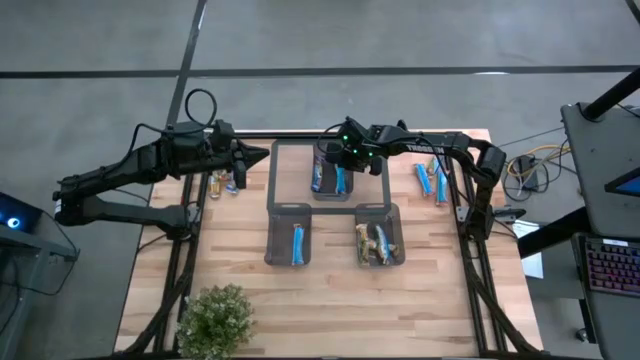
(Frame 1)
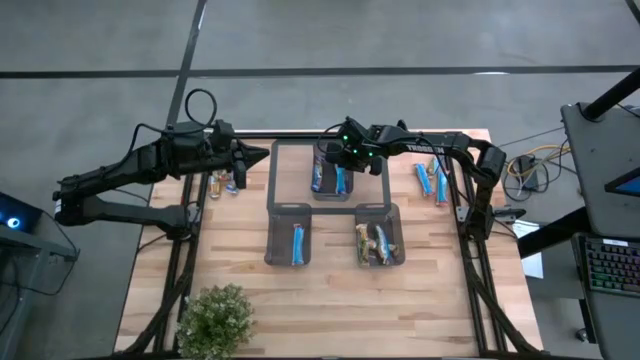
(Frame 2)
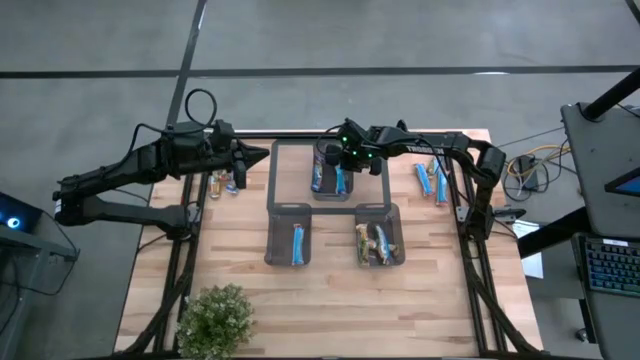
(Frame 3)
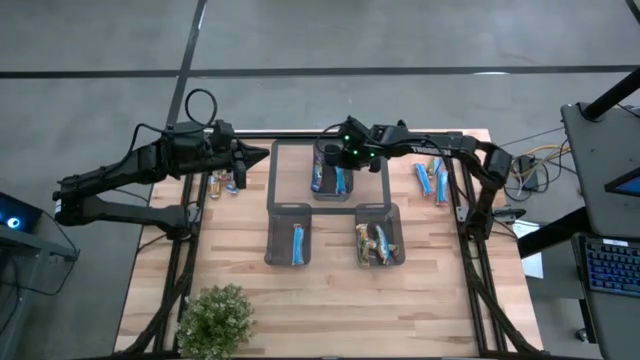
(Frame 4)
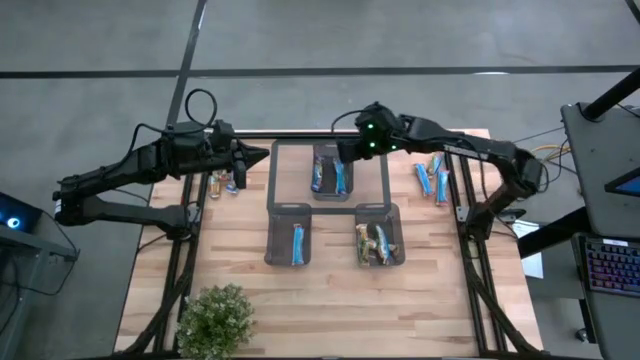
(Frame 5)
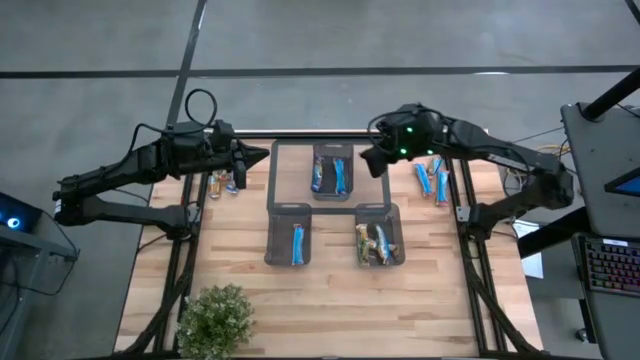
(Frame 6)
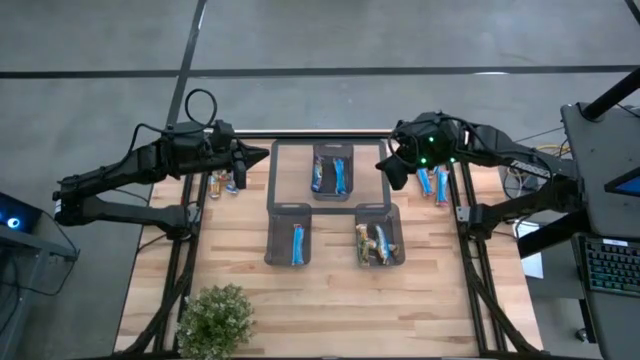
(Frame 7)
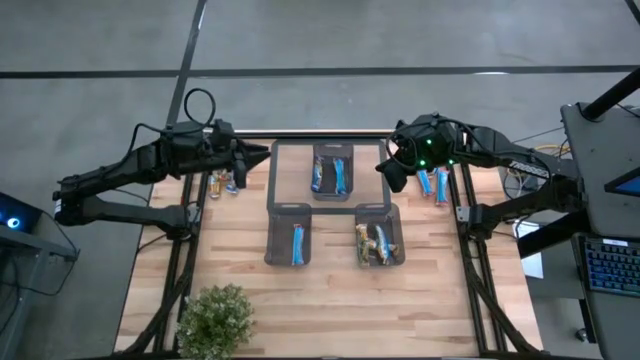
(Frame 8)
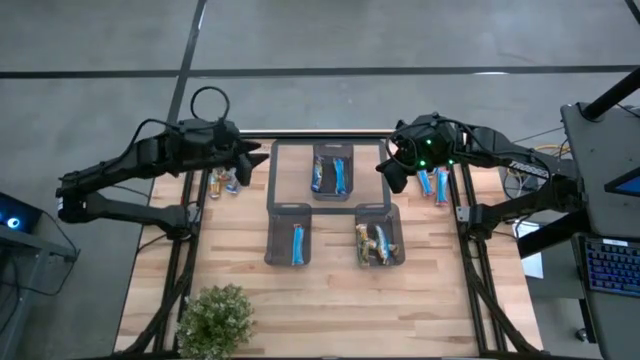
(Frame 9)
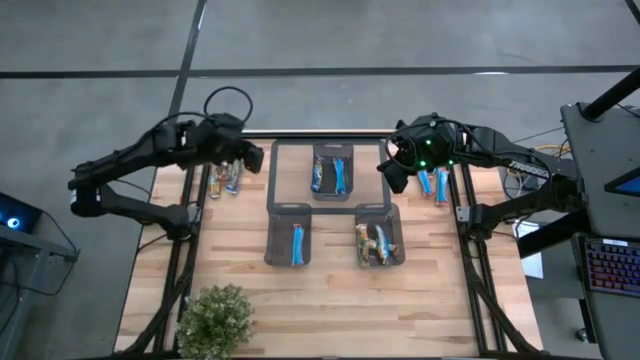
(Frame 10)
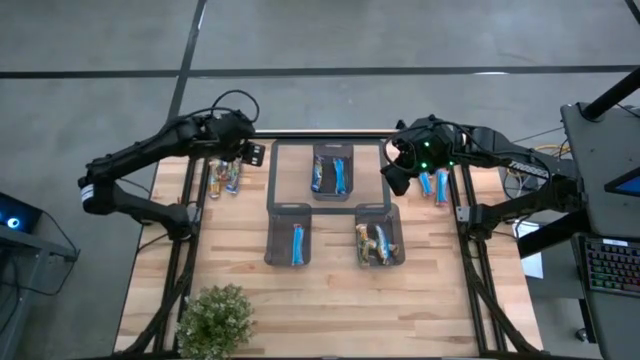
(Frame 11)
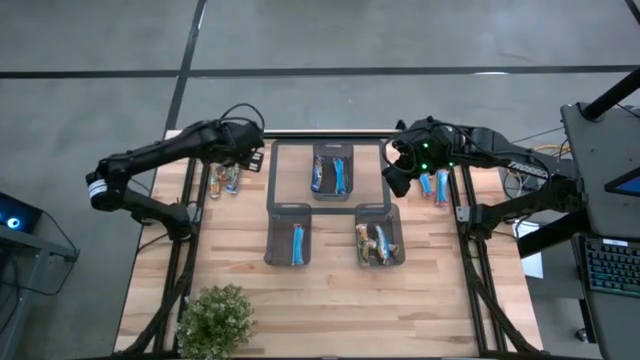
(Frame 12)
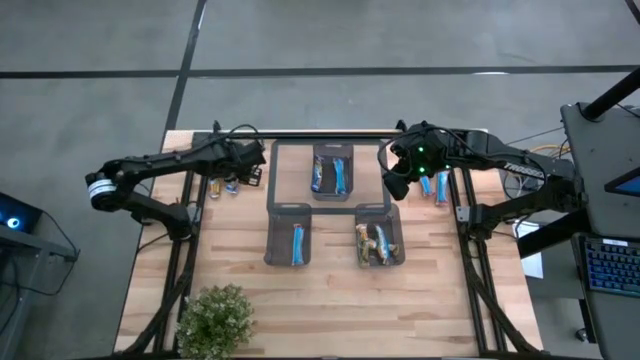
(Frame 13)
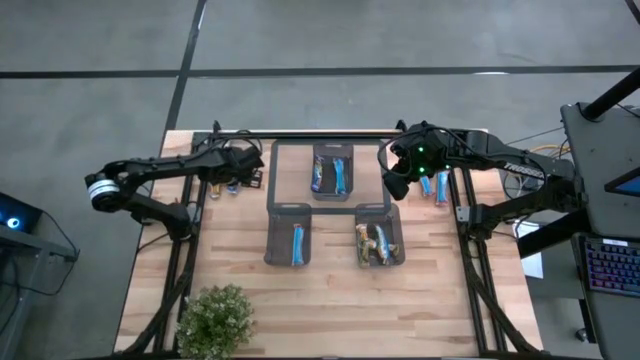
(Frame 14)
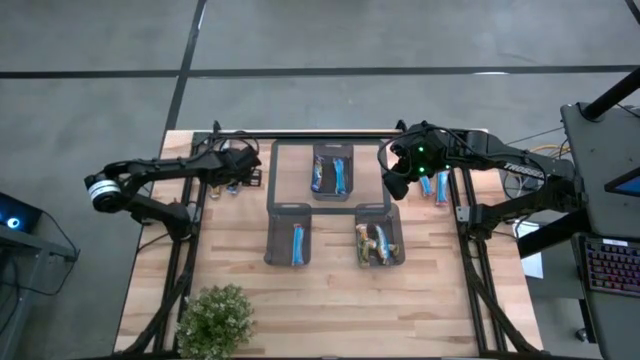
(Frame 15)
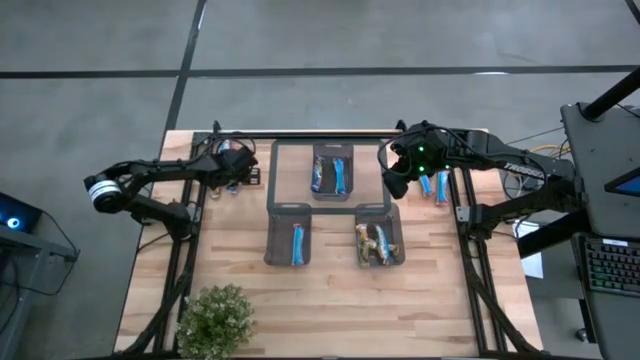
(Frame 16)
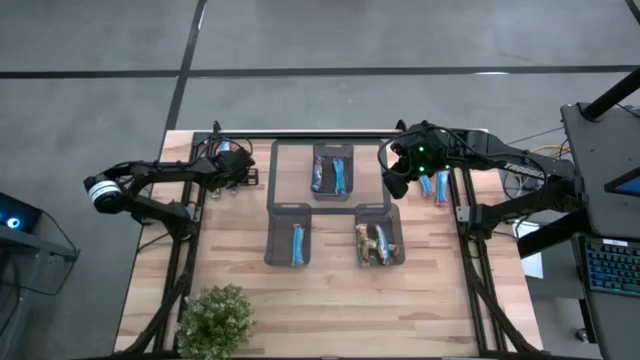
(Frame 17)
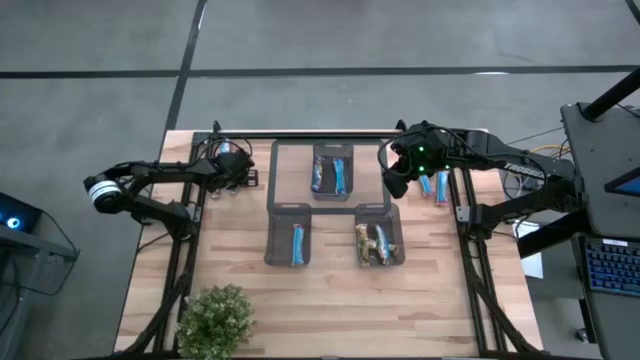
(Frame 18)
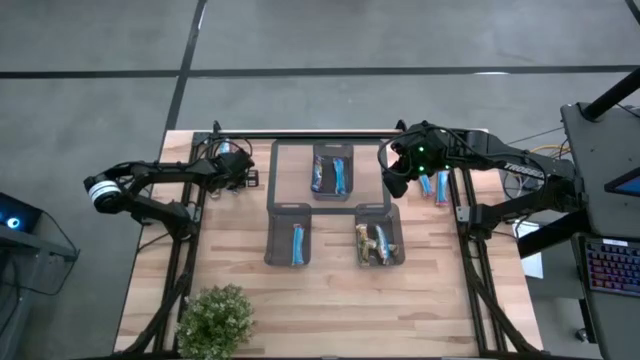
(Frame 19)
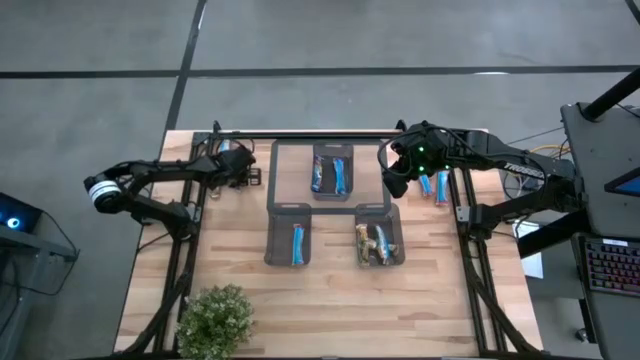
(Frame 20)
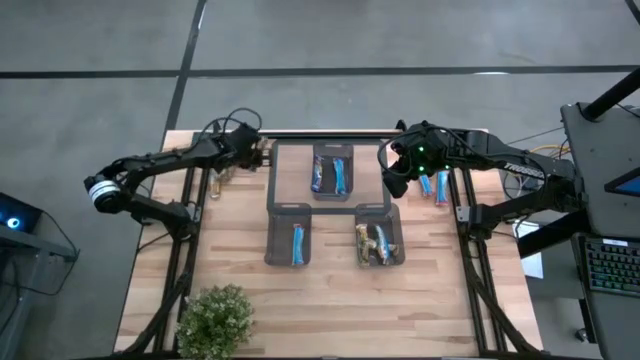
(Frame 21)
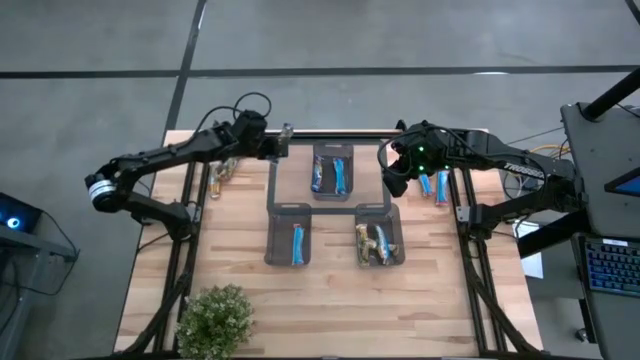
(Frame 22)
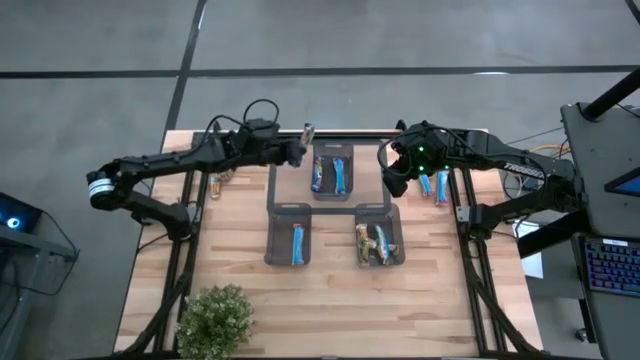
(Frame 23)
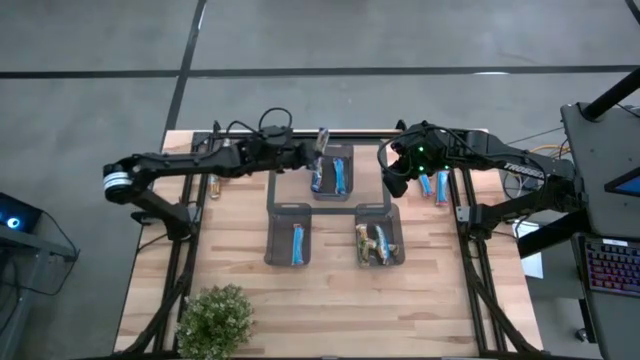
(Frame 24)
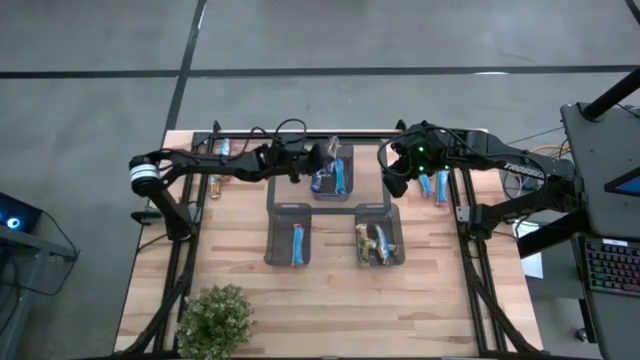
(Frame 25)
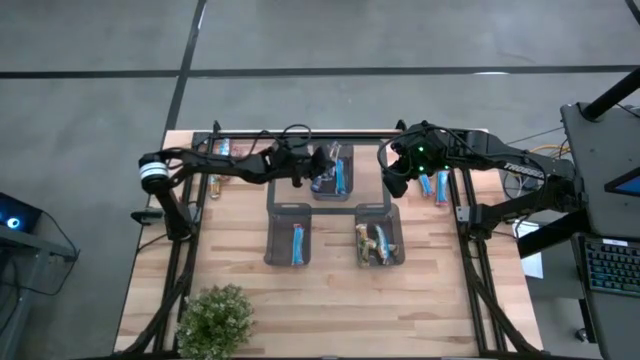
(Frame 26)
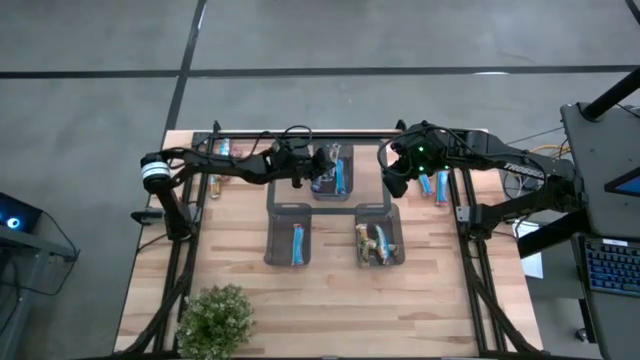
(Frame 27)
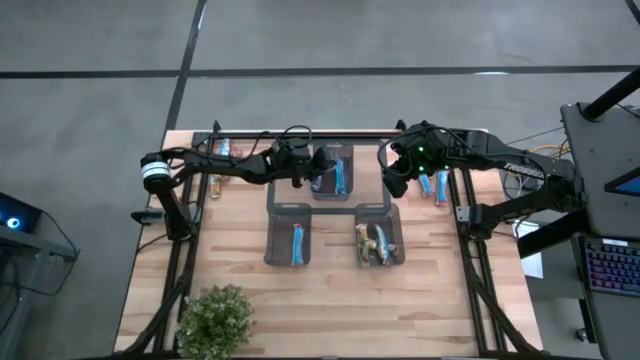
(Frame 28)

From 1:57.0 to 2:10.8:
Task: Pick and place Granola Bars by type
Put the blue granola bar into the top black bin

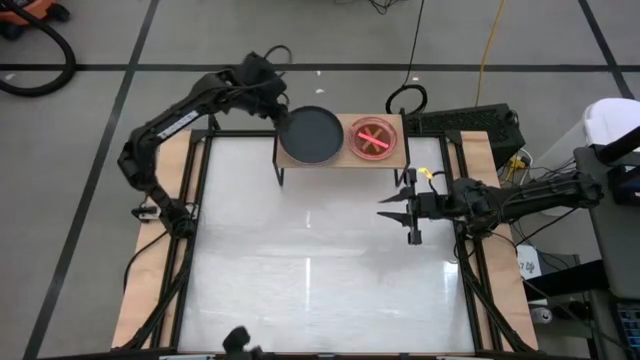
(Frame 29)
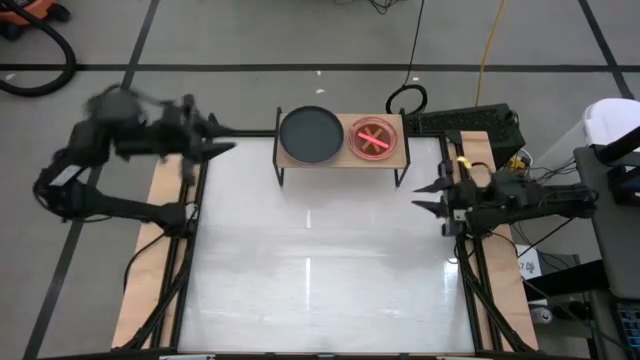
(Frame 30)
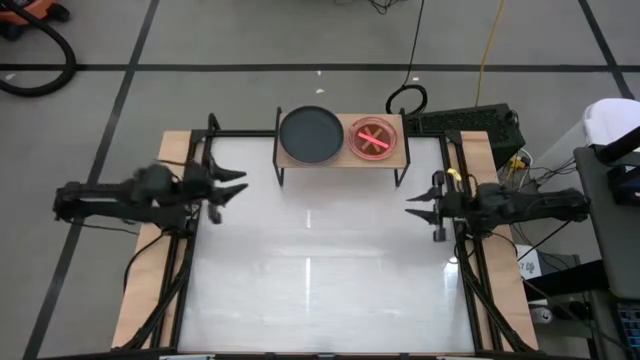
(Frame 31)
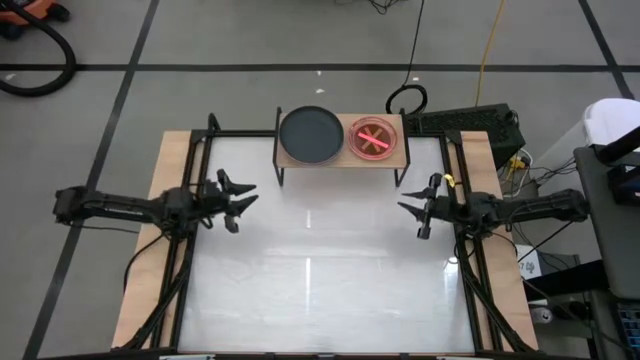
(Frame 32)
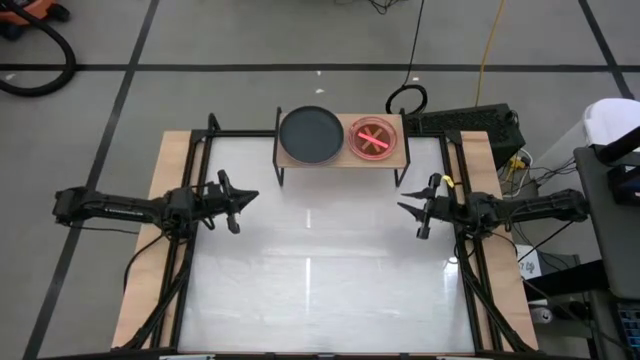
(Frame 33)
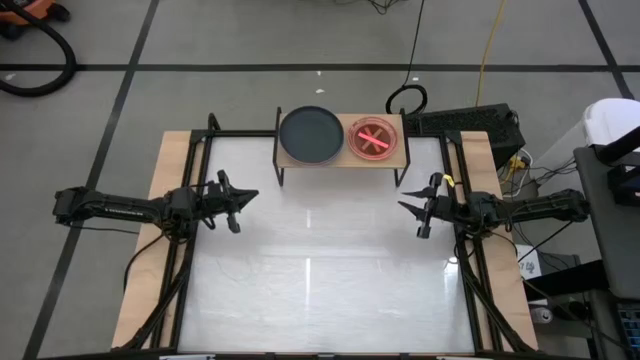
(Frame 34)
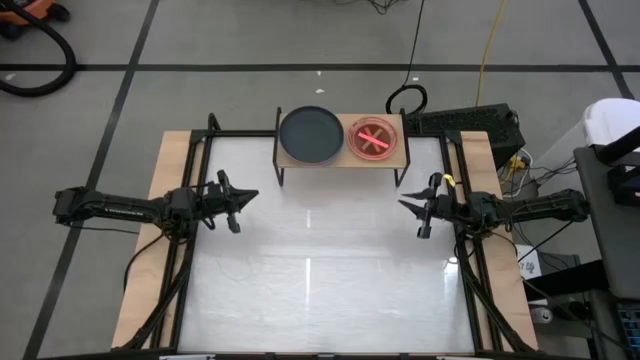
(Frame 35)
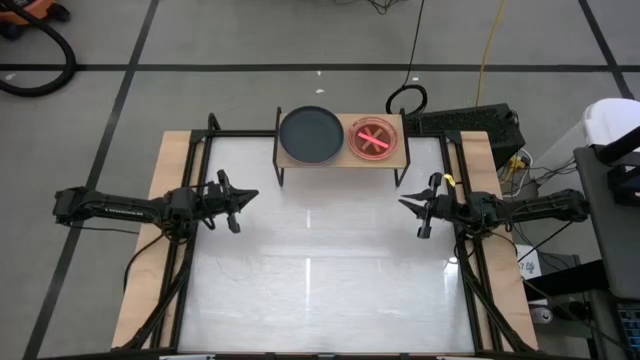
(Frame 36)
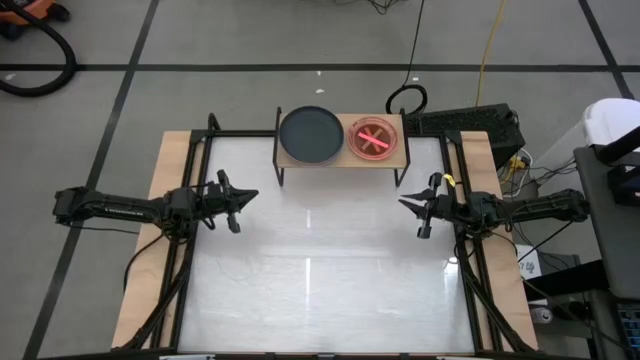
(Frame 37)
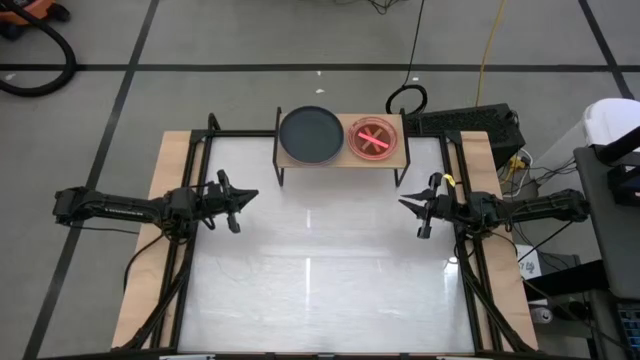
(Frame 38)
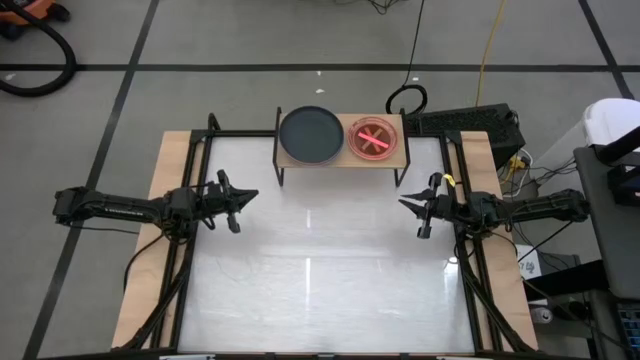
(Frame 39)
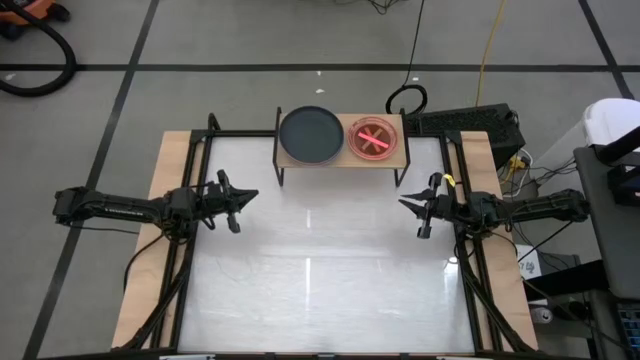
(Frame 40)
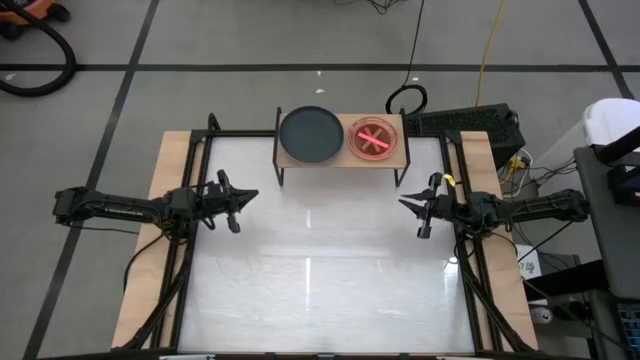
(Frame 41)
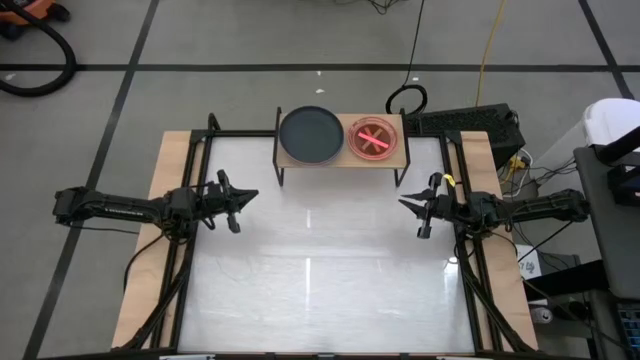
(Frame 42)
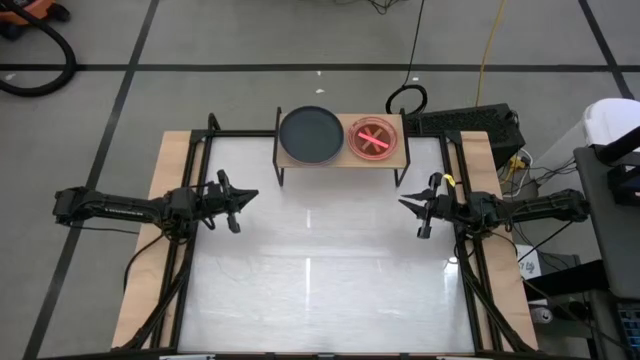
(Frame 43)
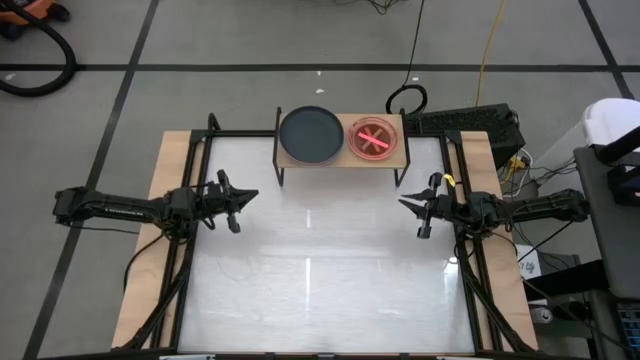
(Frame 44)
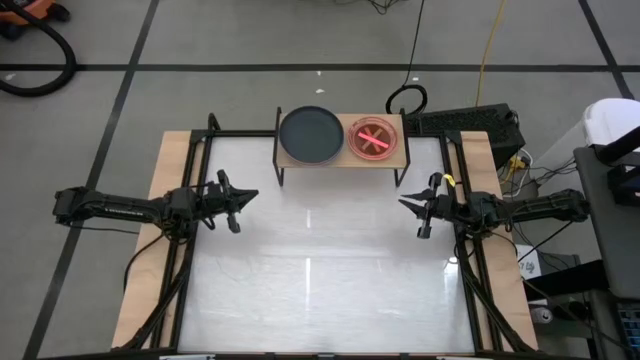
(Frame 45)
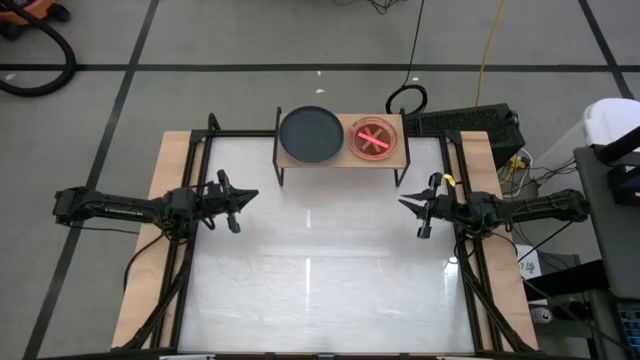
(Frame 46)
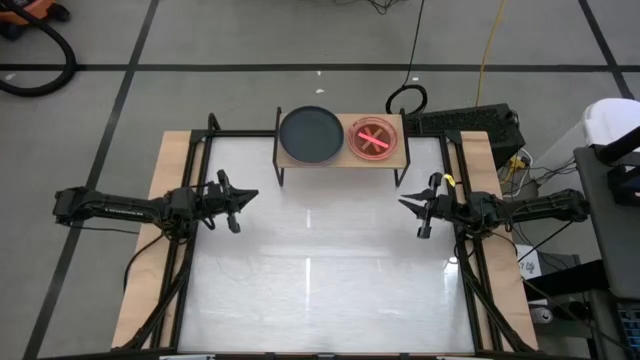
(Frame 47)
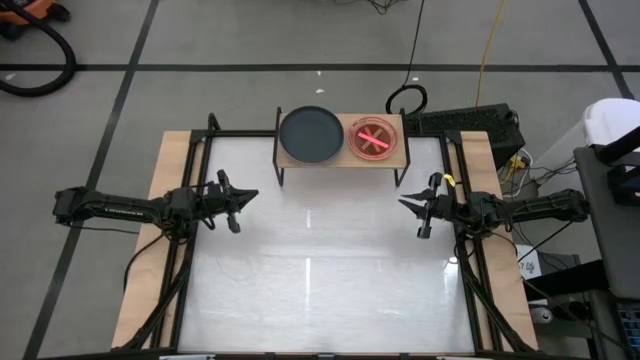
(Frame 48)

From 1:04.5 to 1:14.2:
Task: Place and stack plates onto a shelf
Return to Home Position
